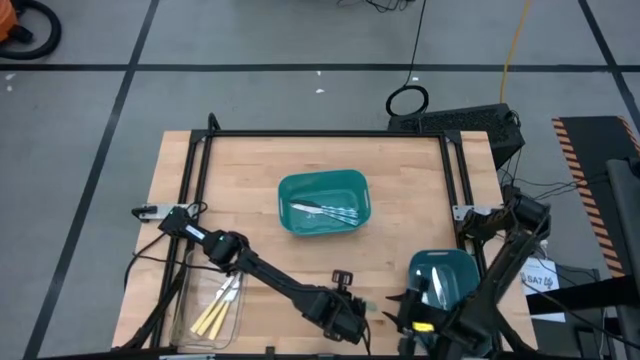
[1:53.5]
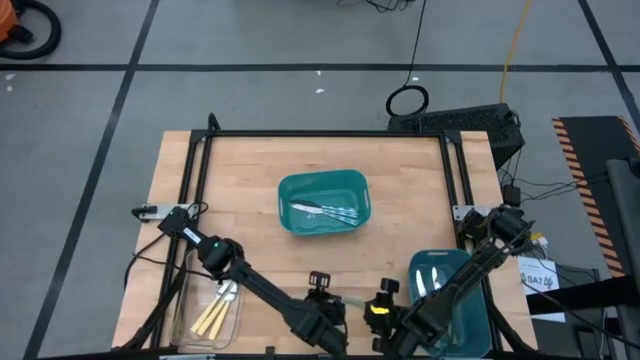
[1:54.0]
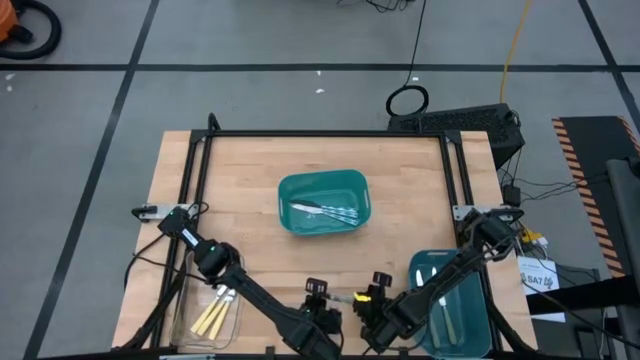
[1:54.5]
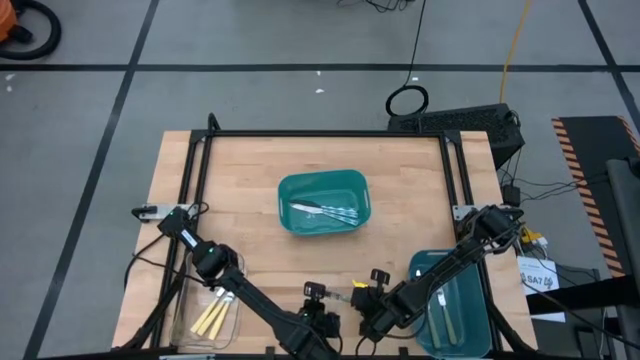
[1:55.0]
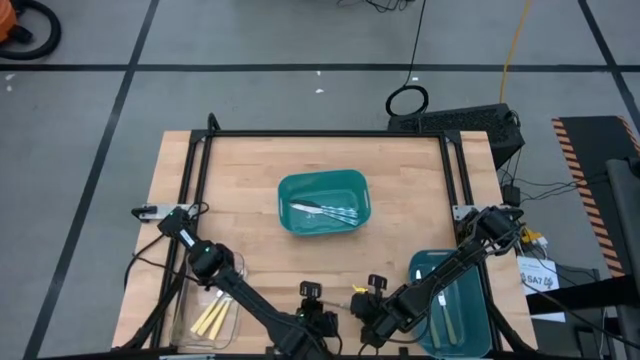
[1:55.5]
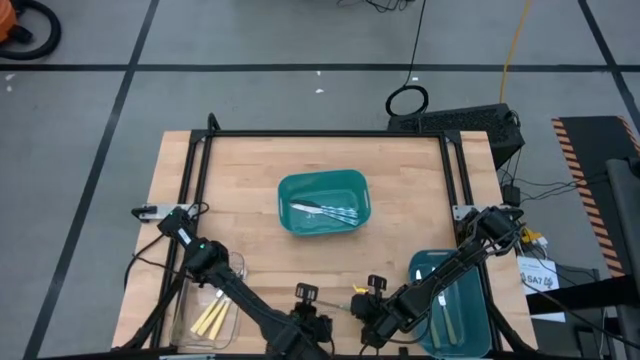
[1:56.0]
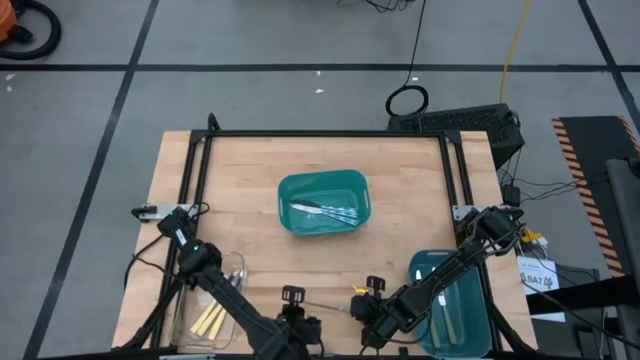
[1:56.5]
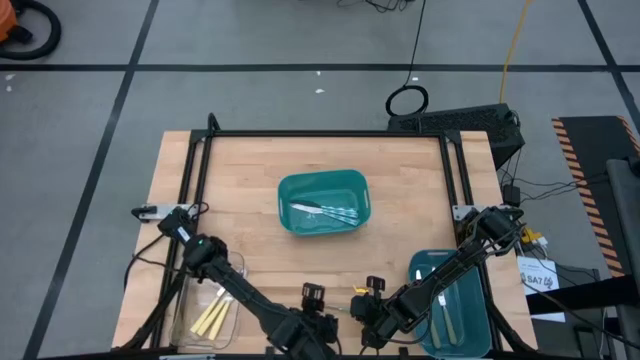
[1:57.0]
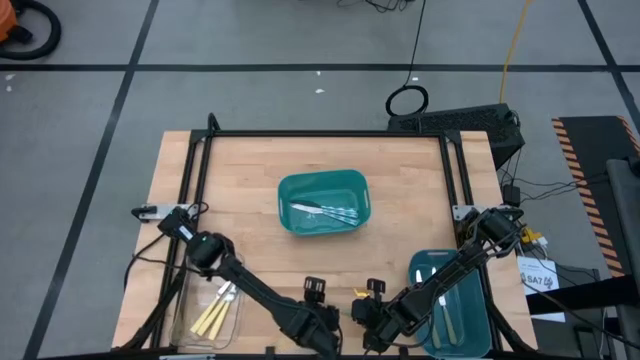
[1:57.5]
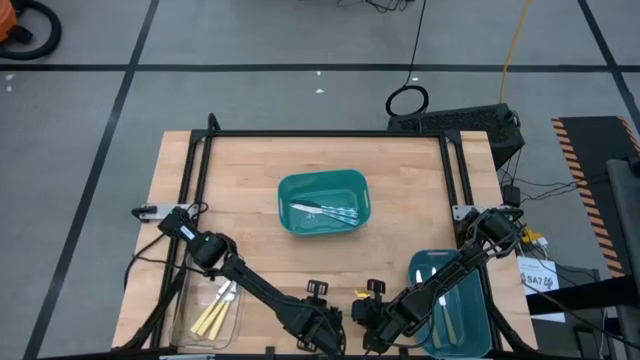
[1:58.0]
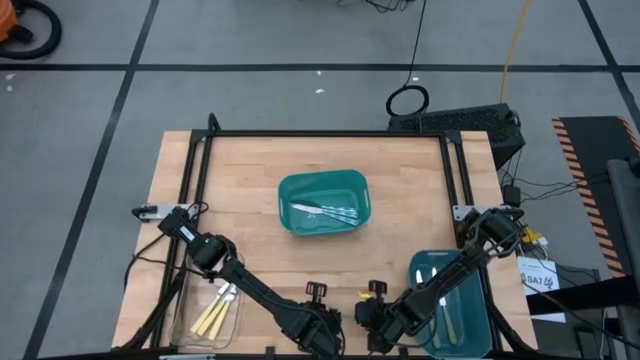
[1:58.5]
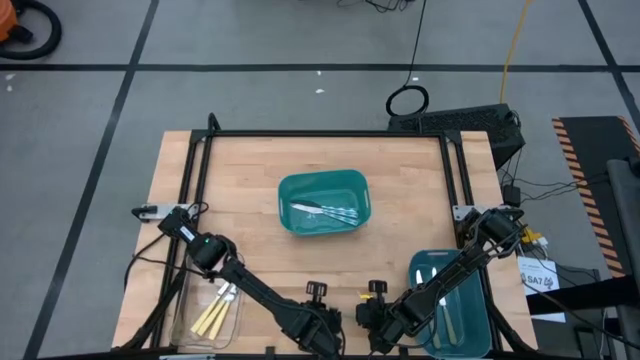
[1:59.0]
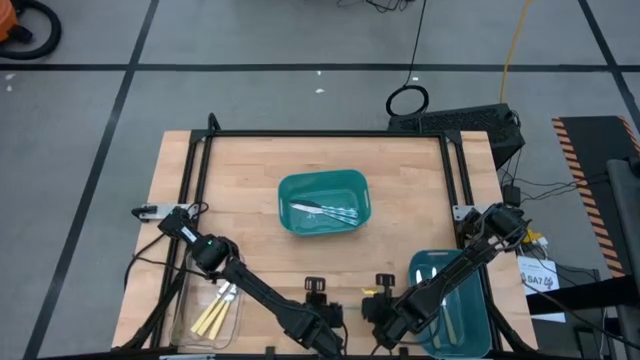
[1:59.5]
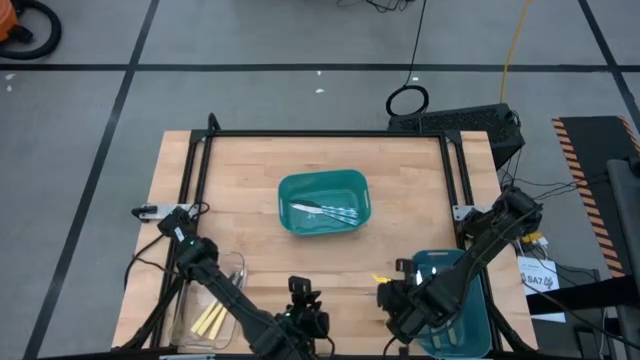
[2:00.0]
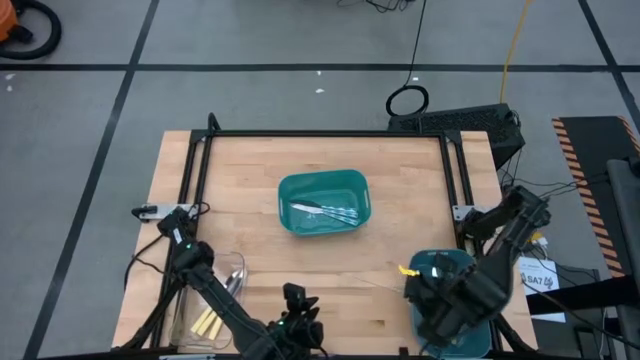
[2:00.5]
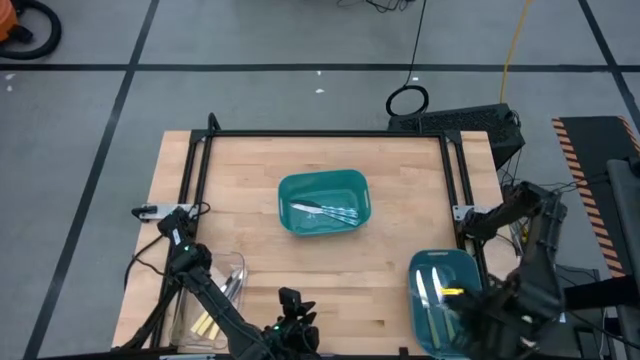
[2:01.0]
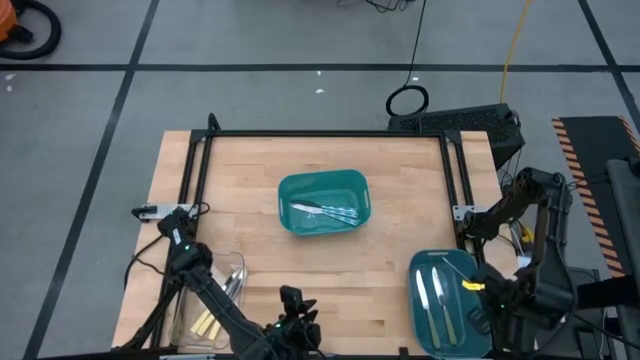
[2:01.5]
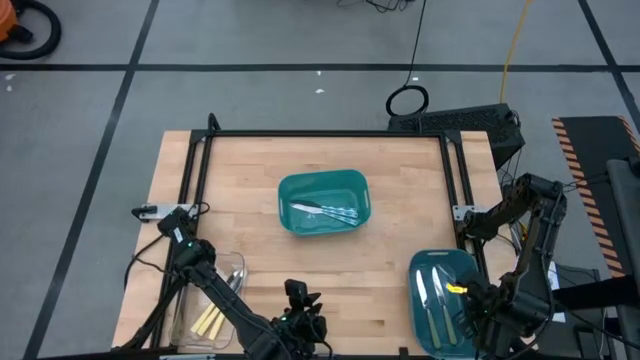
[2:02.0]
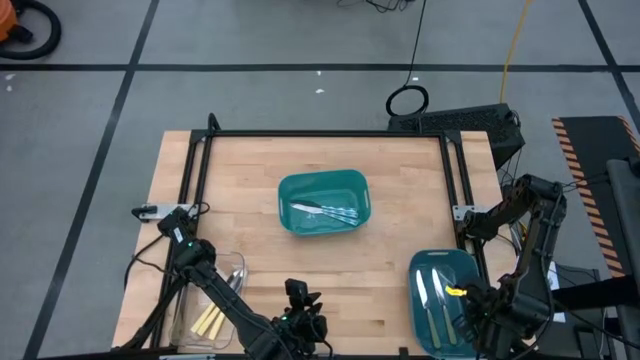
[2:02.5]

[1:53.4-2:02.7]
Task: Sort silverware by color (type)
Put the green knife into the blue bin

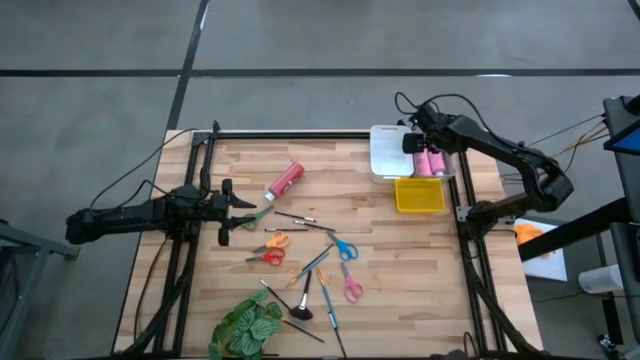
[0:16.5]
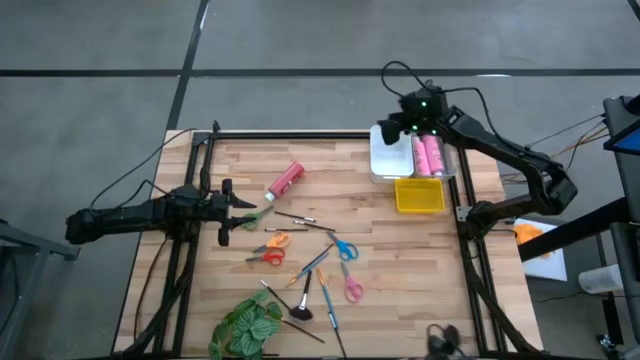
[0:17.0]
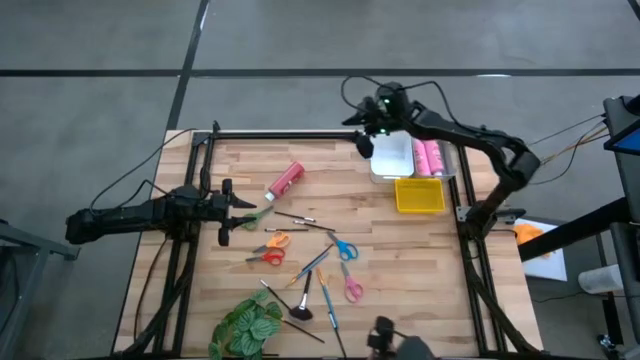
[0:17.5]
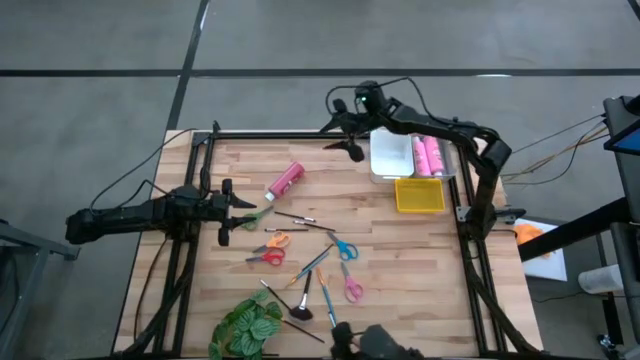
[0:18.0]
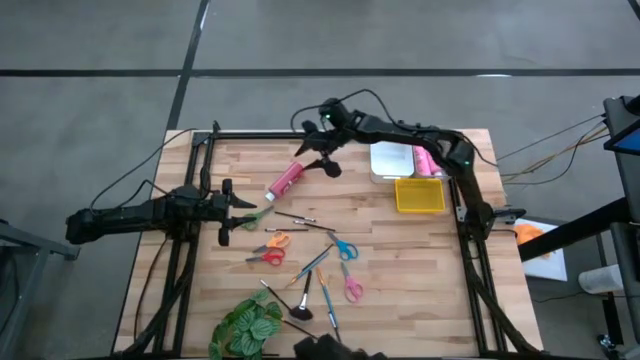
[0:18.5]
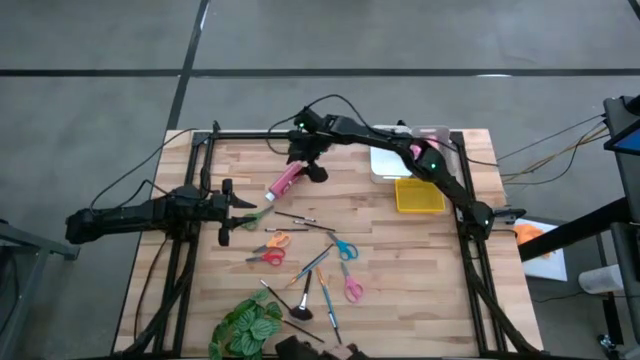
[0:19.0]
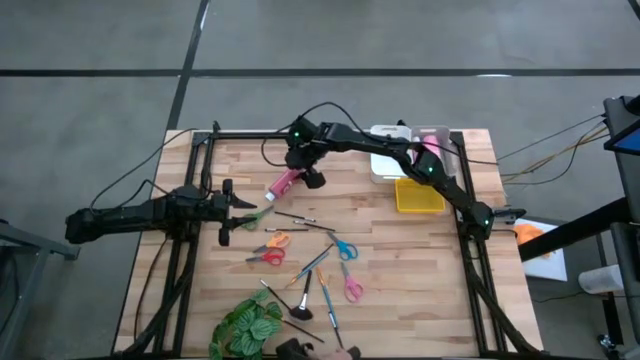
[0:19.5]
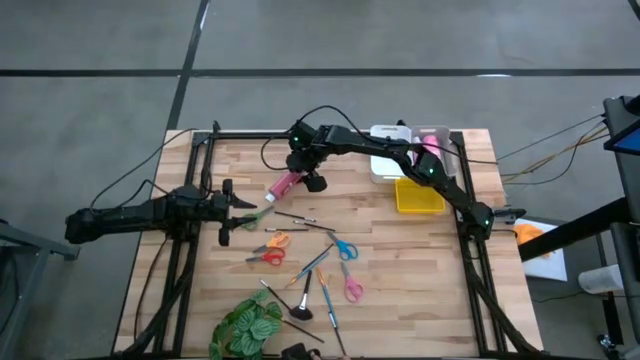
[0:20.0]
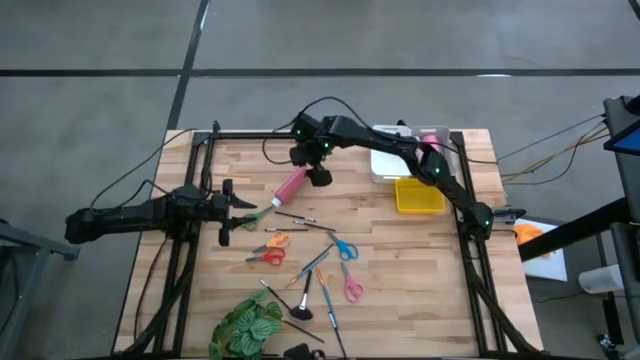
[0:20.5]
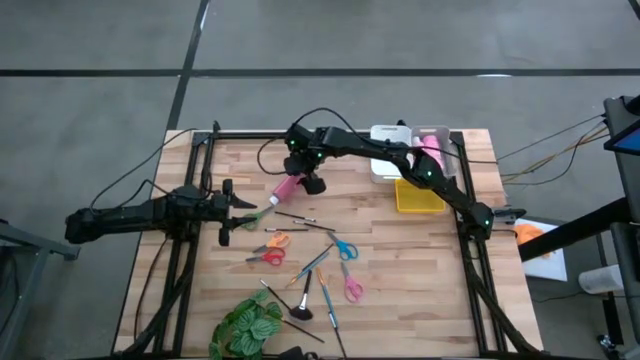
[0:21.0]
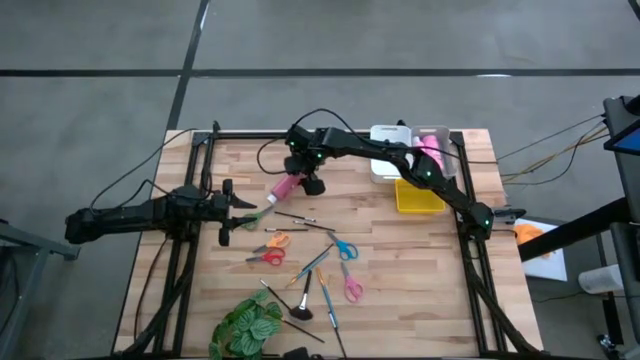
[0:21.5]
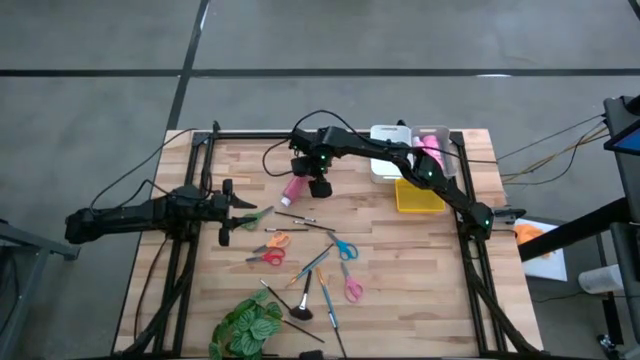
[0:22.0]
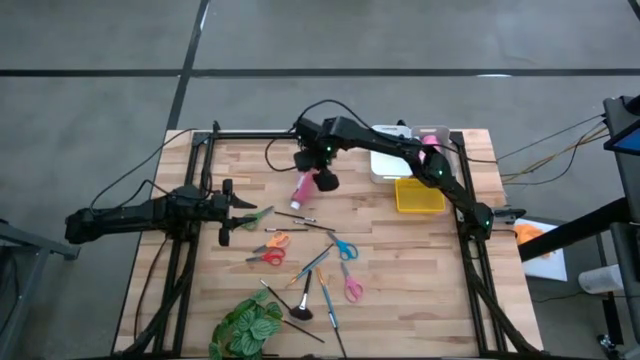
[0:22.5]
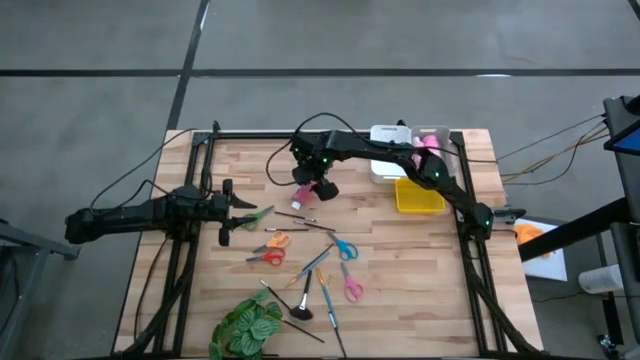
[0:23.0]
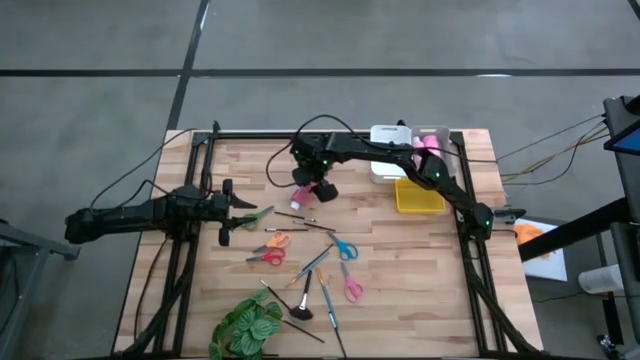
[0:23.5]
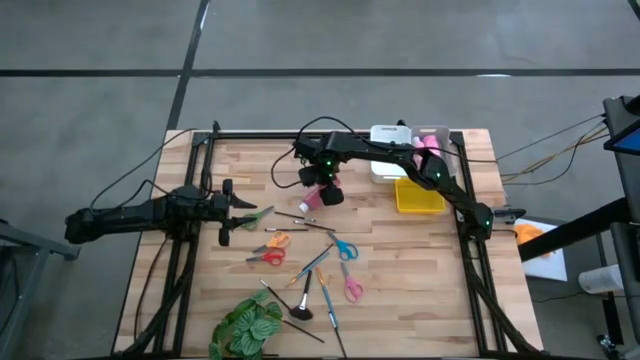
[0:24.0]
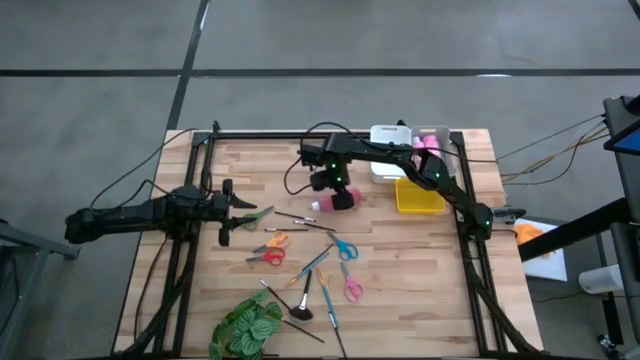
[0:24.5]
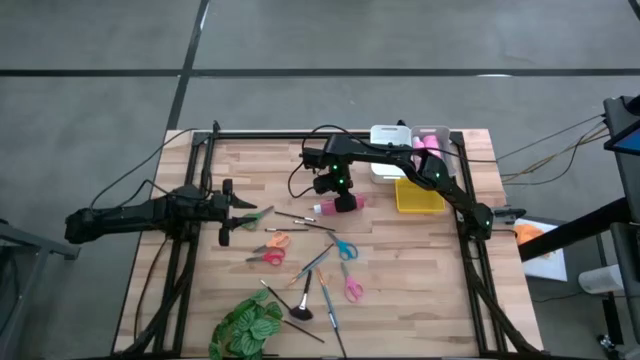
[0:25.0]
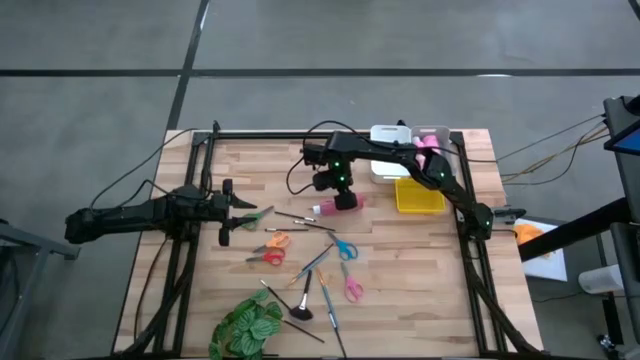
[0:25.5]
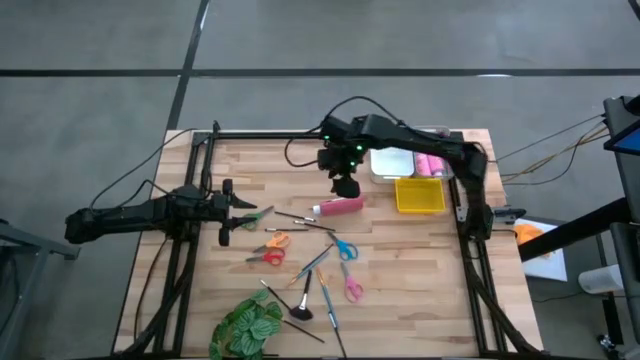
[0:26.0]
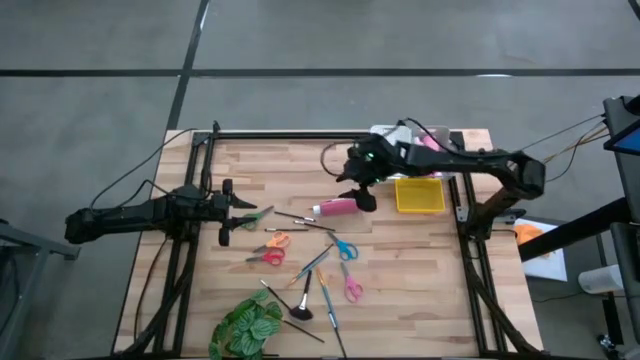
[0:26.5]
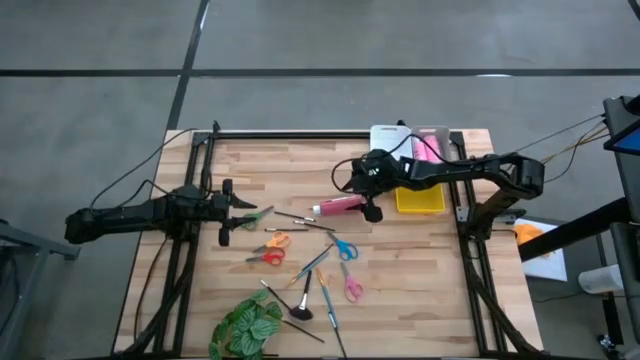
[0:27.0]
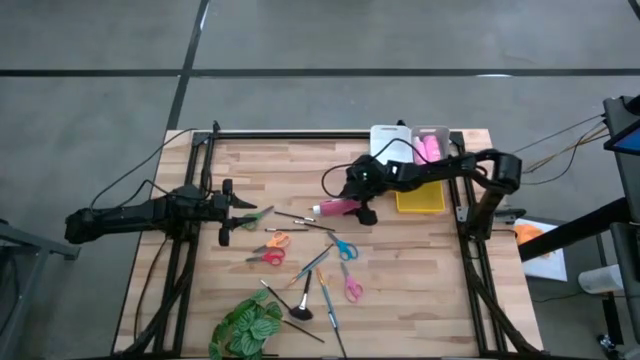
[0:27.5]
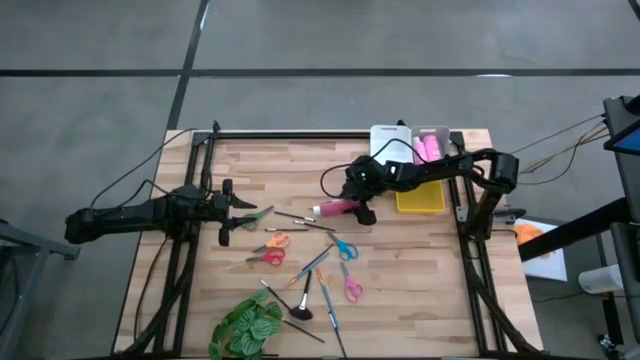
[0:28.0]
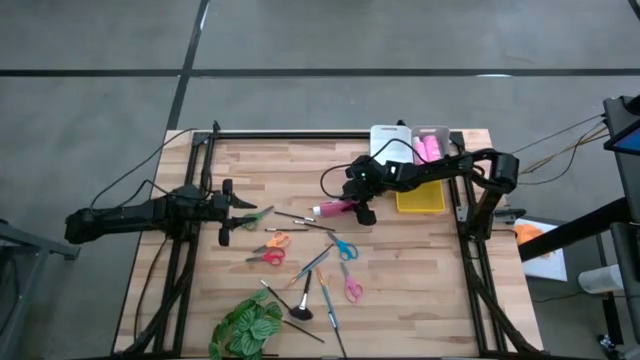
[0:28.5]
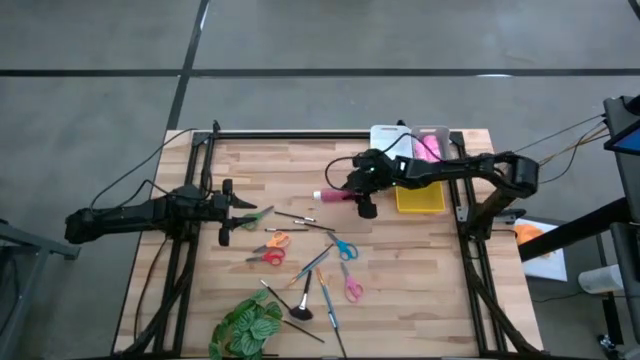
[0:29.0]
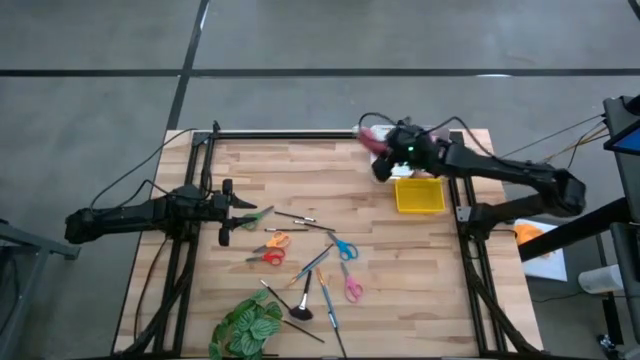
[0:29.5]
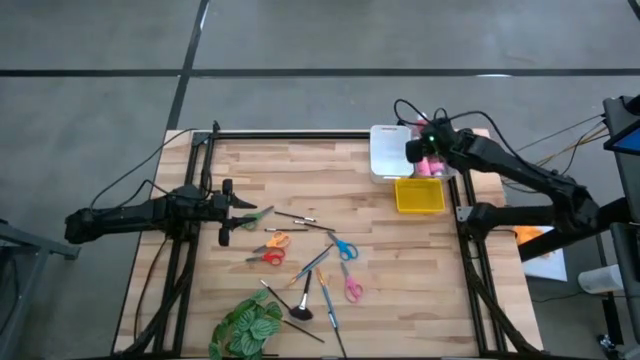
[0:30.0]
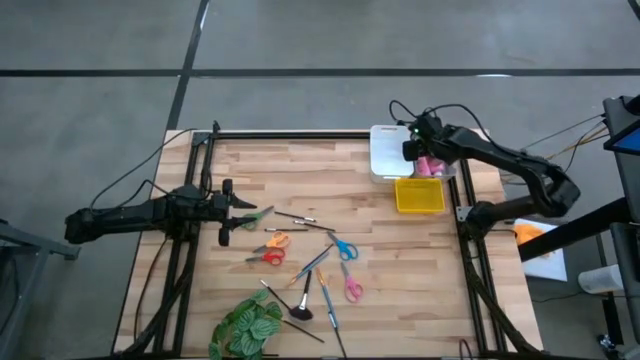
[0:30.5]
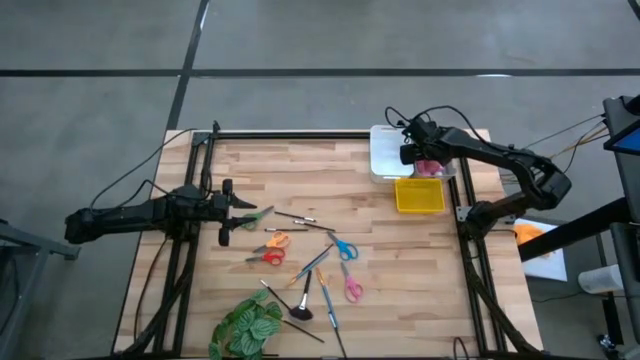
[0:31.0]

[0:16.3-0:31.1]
Task: Pick & Place Paint Supplies
Put the red paint bottle into the gray bin
